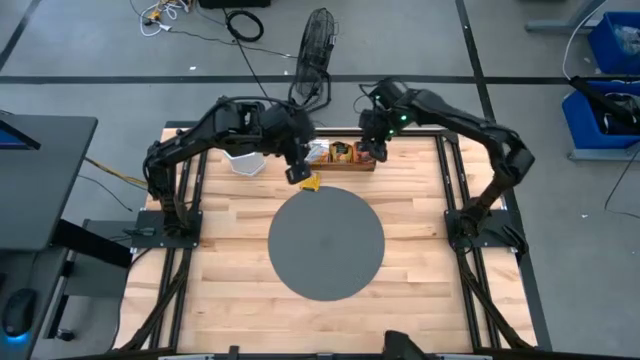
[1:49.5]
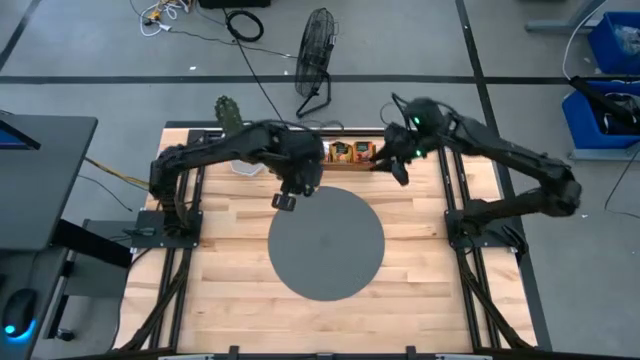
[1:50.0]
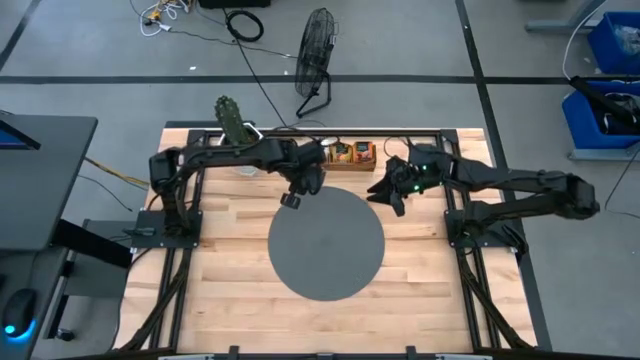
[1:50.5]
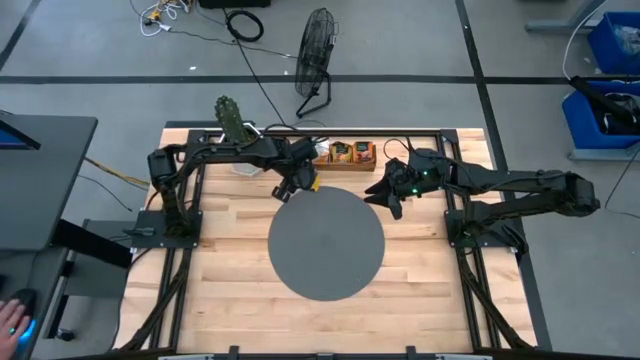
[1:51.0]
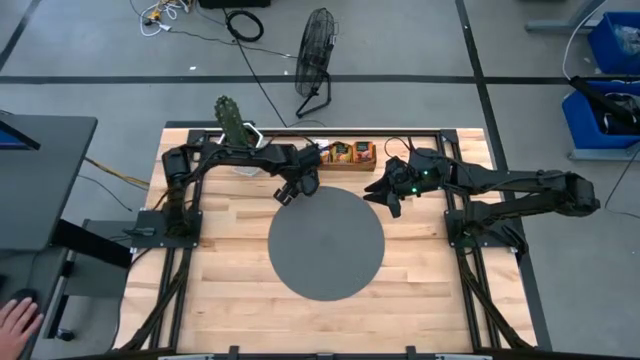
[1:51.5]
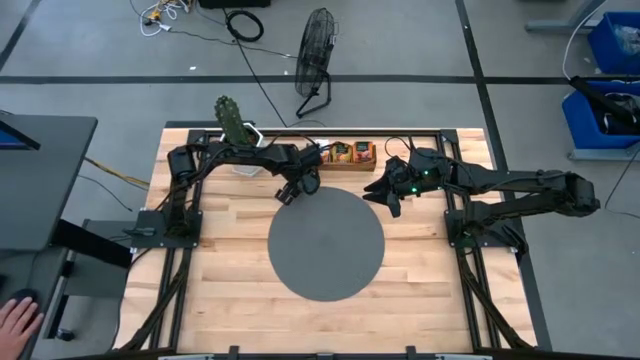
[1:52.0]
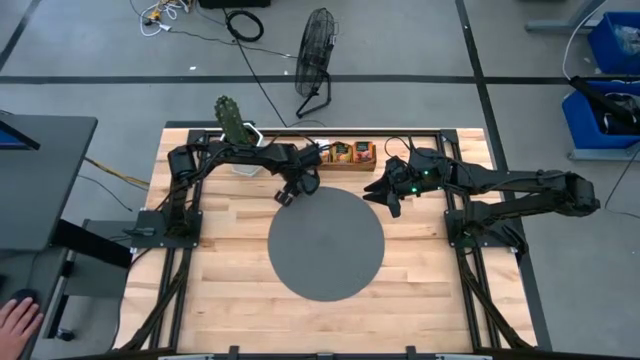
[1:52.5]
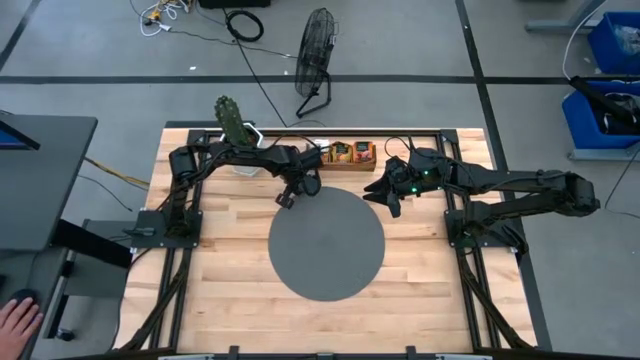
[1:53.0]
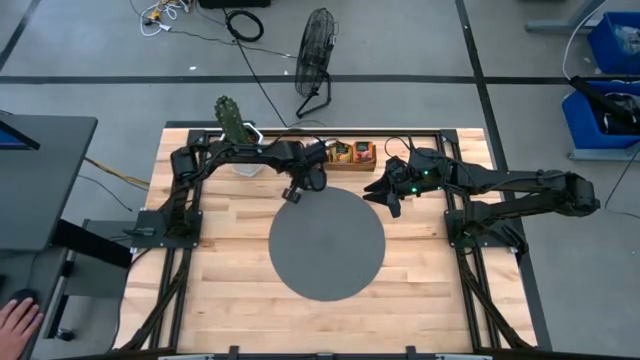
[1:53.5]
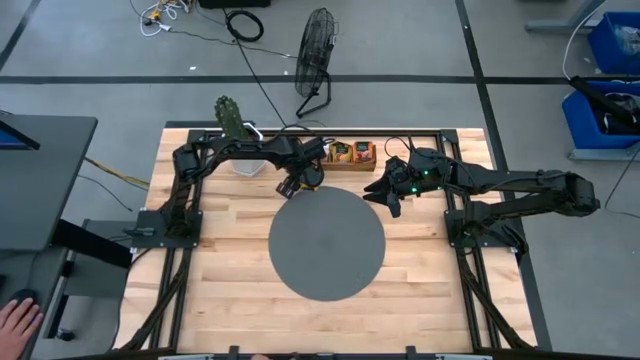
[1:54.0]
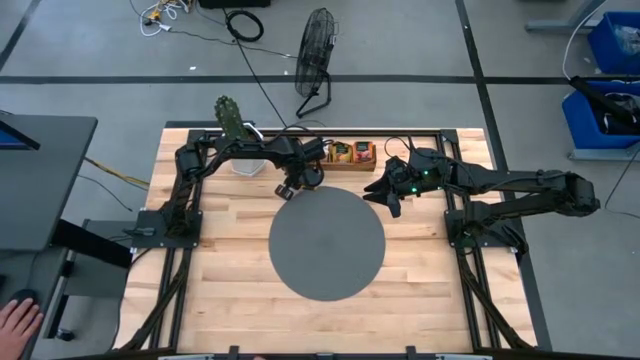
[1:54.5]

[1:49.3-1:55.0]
Task: Pick & Place Tea
Put the orange tea bag into the middle section of the wooden organizer

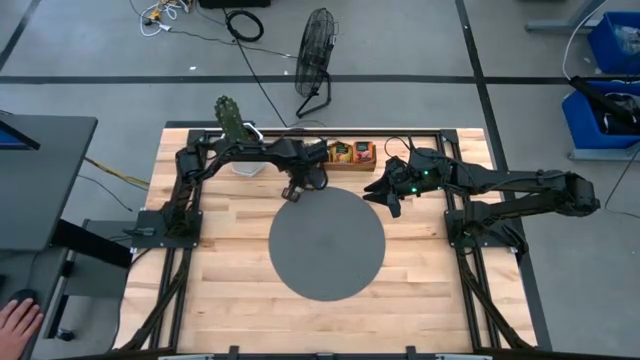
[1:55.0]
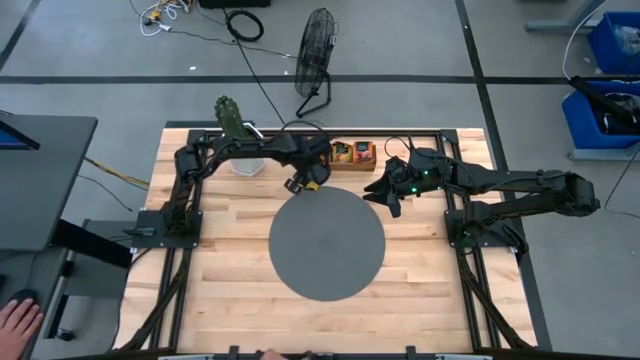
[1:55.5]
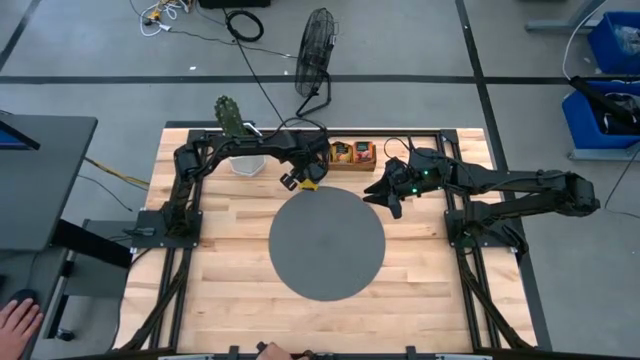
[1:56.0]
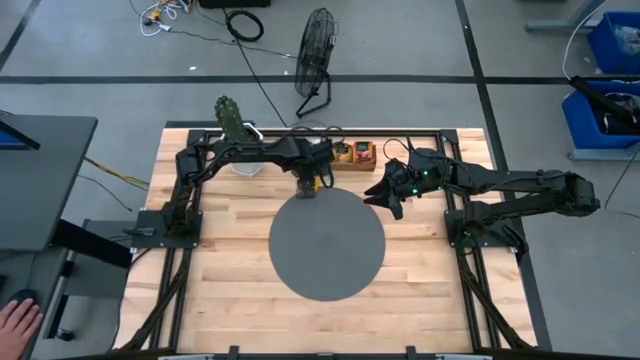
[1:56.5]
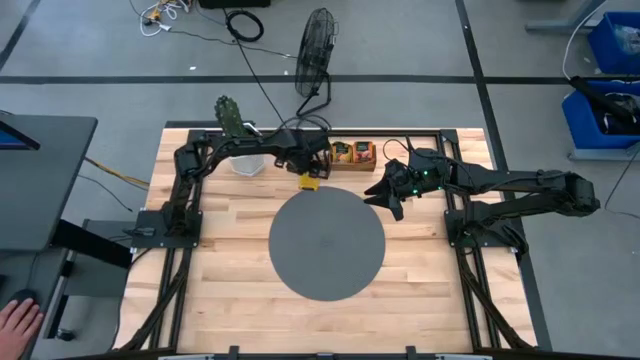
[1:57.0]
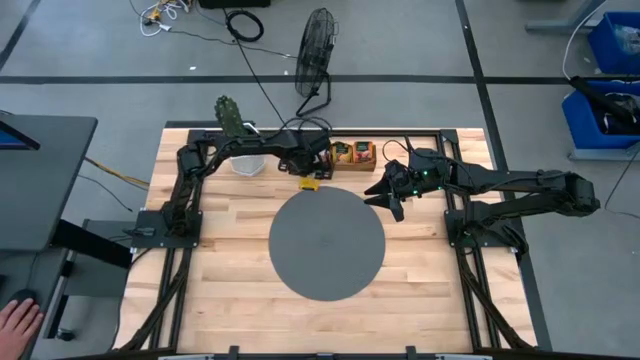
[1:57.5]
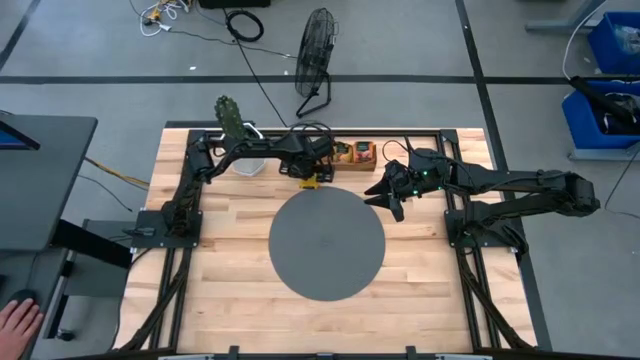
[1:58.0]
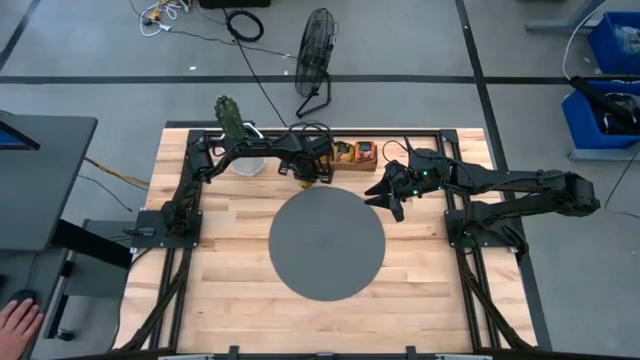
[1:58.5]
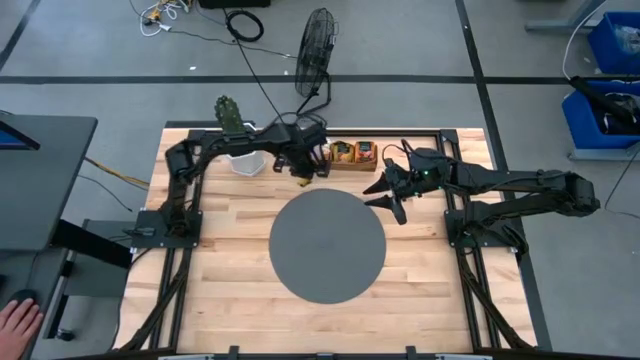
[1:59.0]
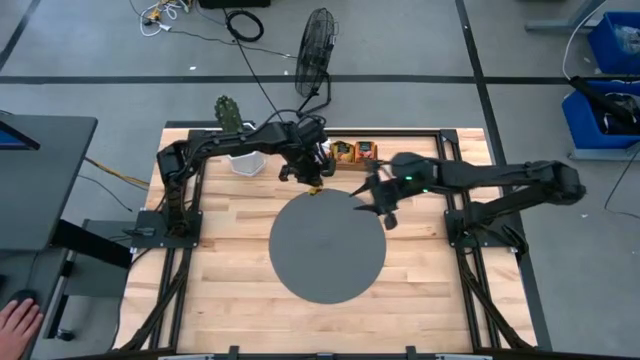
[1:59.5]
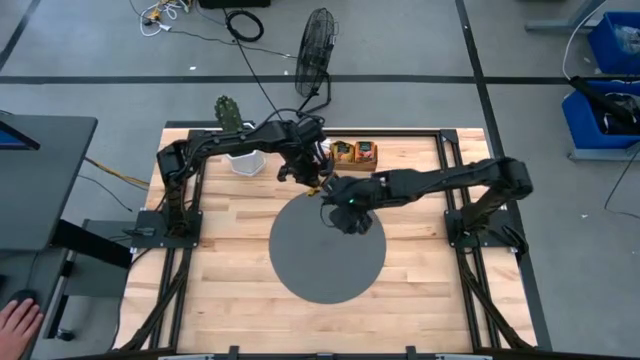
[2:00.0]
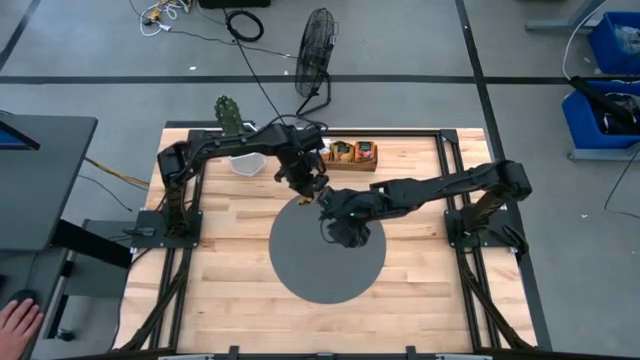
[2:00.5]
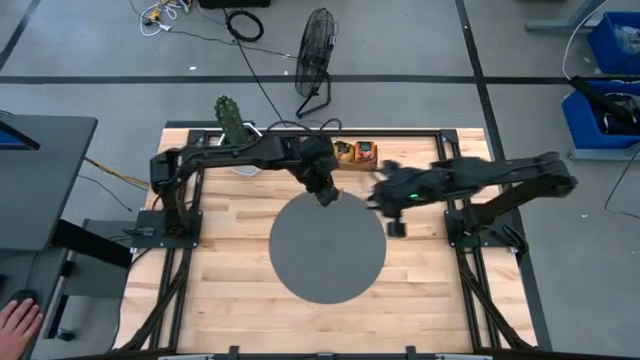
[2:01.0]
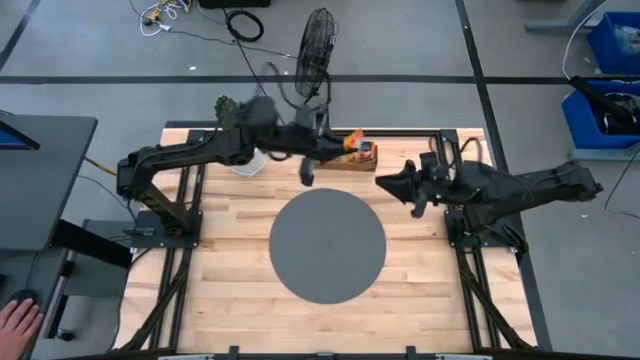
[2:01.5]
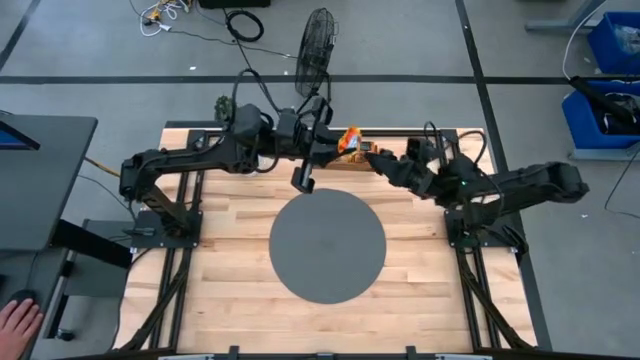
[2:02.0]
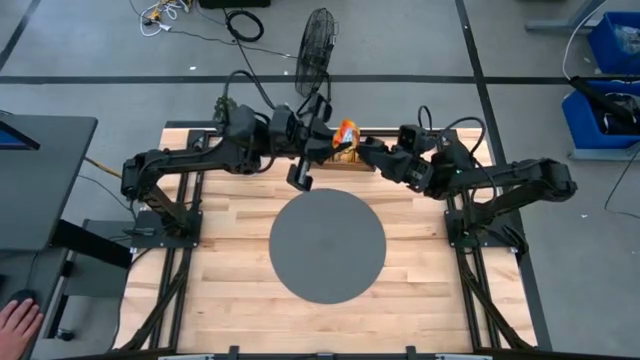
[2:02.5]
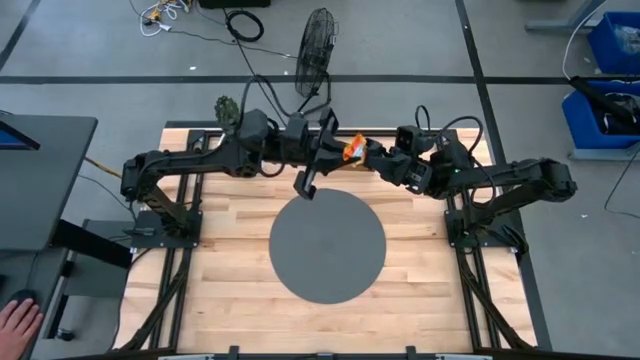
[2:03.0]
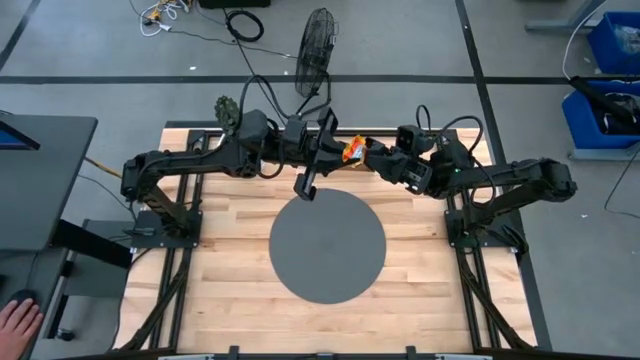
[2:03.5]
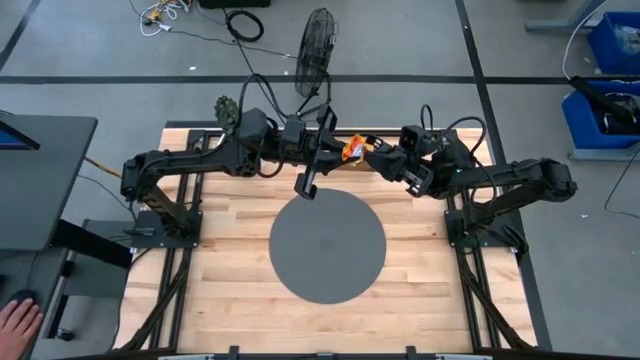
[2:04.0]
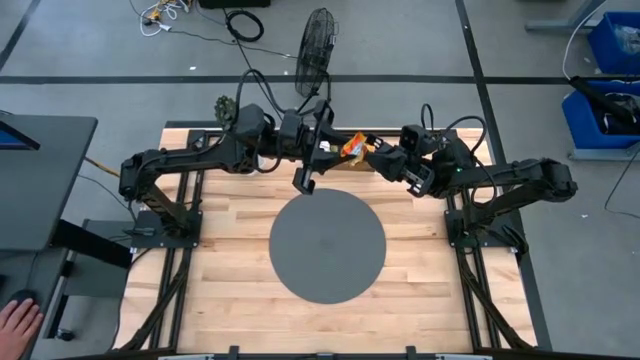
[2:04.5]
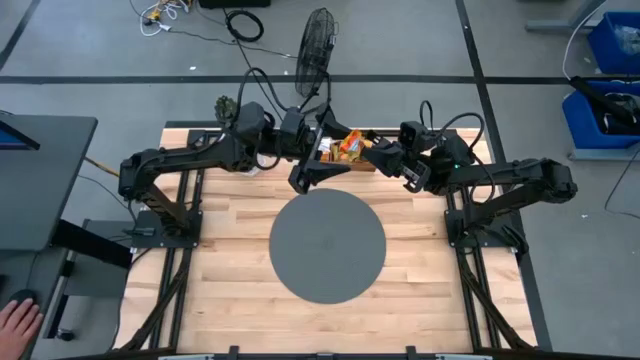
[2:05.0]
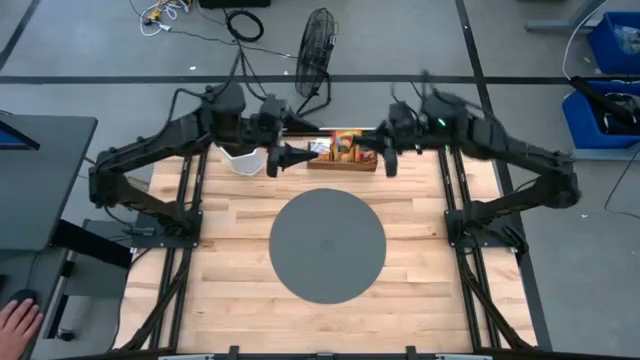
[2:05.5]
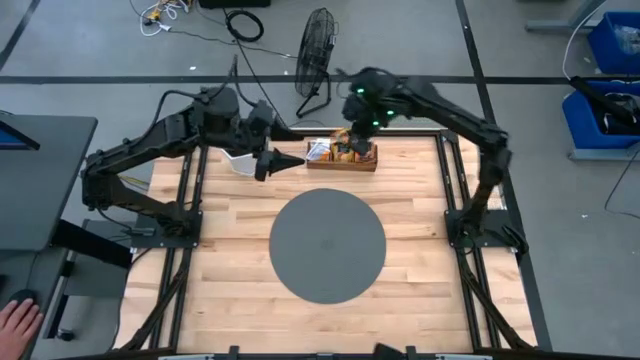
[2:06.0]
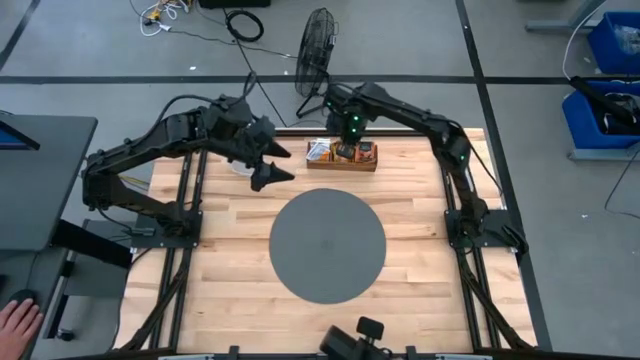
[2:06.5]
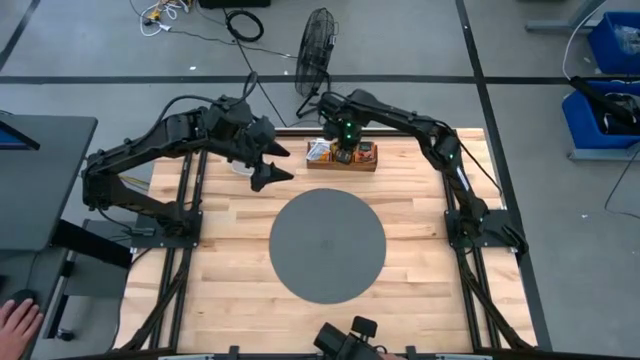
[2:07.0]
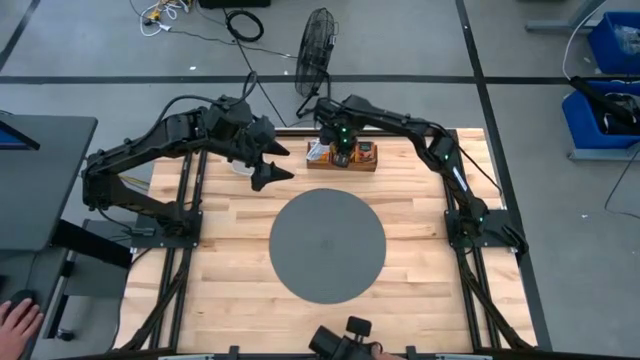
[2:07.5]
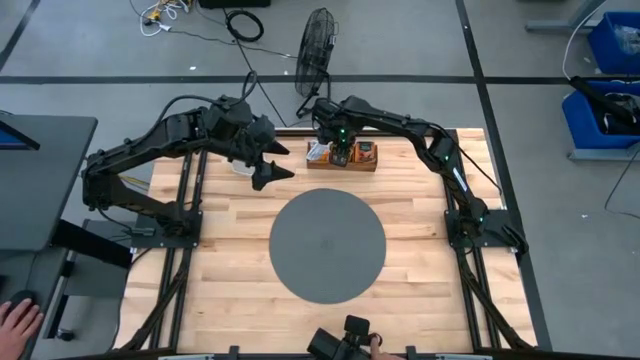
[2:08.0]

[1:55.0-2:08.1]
Put the orange tea bag into the middle section of the wooden organizer

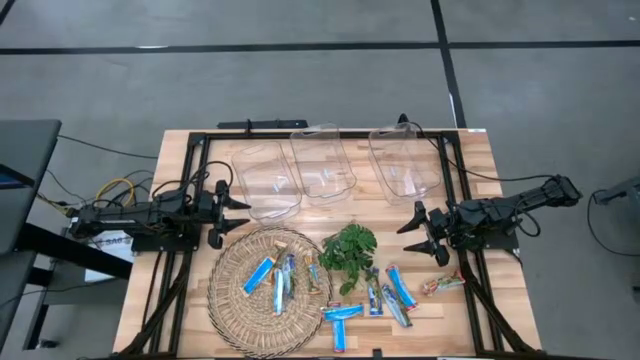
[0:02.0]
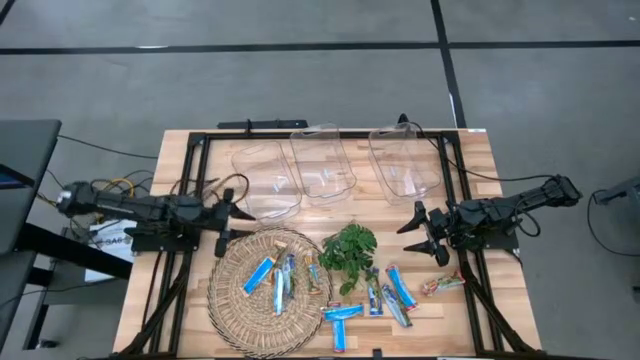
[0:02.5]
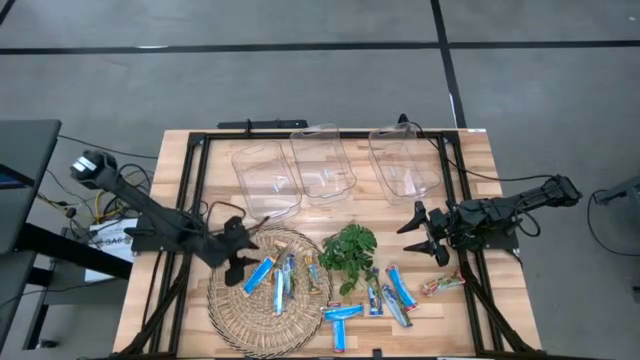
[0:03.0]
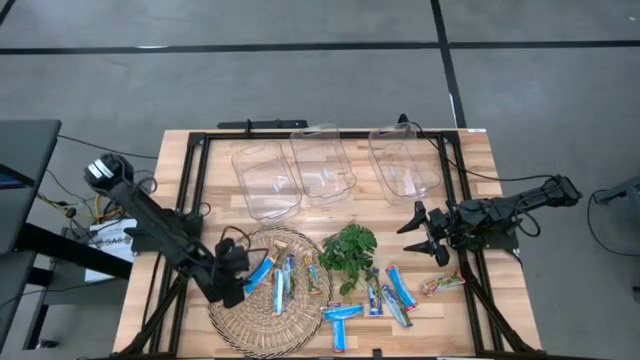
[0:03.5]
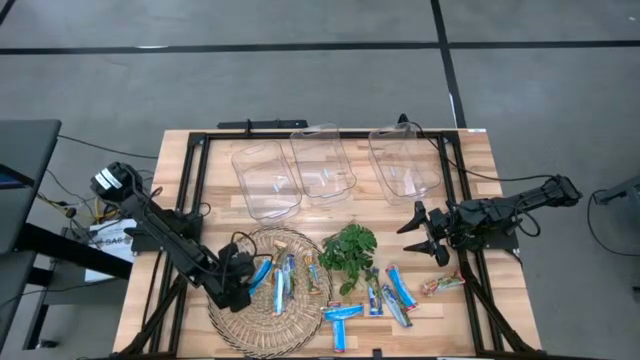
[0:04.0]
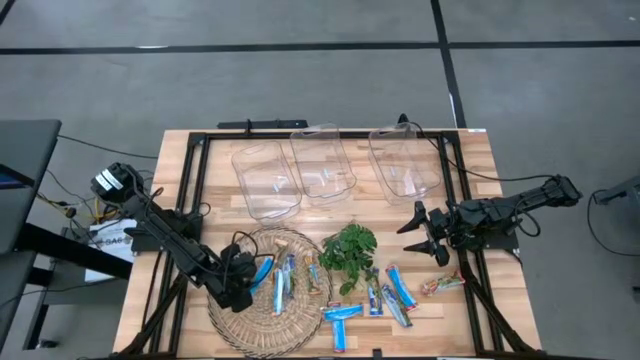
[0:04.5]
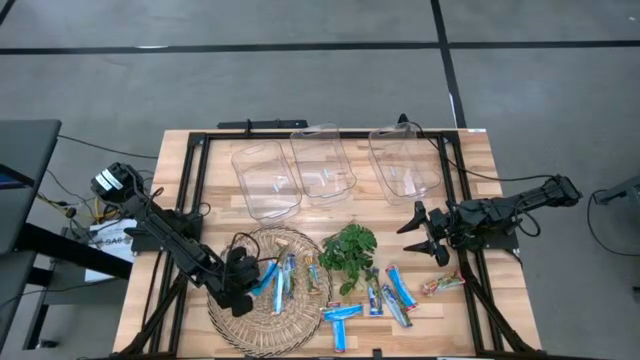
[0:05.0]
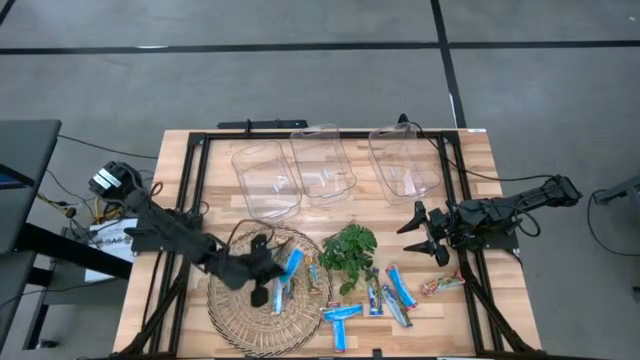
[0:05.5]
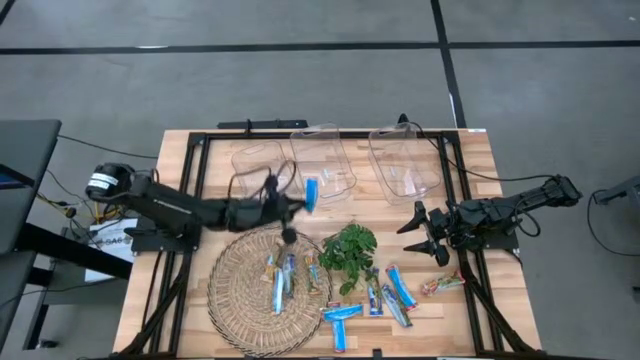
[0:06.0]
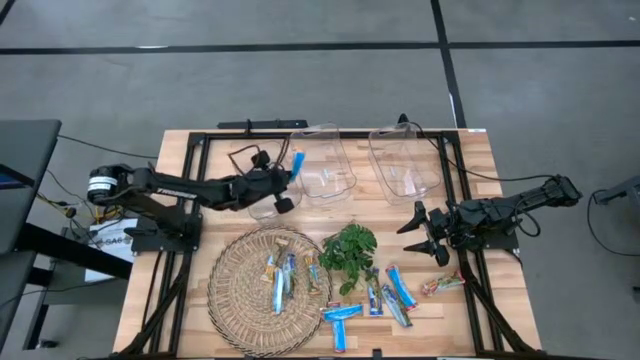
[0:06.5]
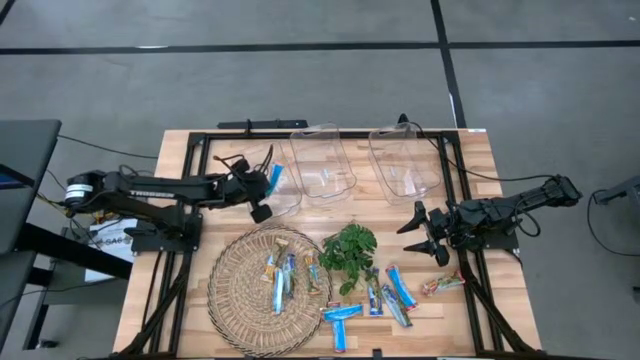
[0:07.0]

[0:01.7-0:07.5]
Task: Pick and place Granola Bars by type
Put the yellow granola bar into the left transparent bin
